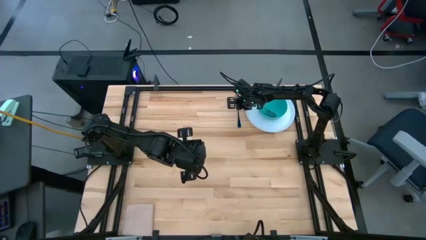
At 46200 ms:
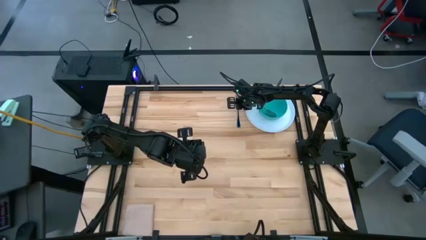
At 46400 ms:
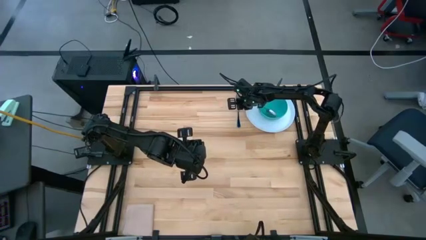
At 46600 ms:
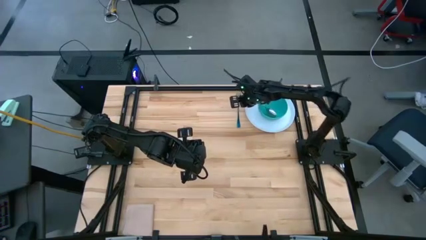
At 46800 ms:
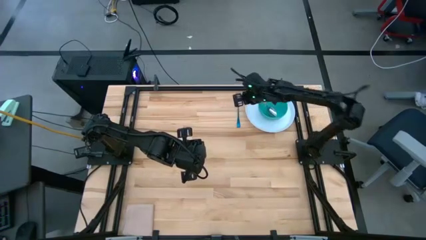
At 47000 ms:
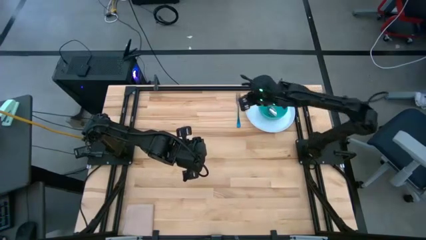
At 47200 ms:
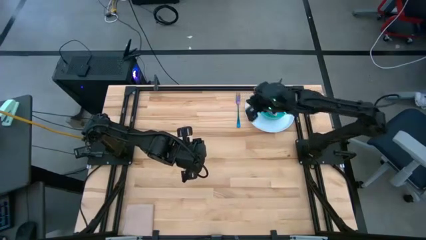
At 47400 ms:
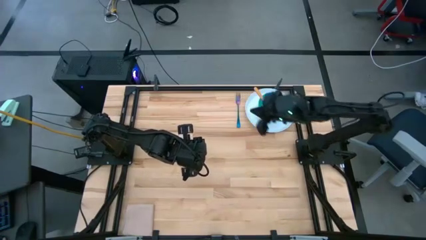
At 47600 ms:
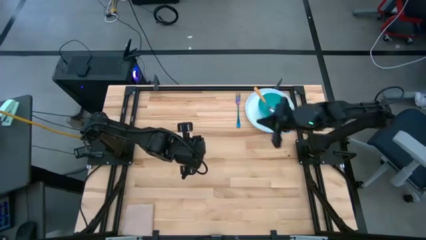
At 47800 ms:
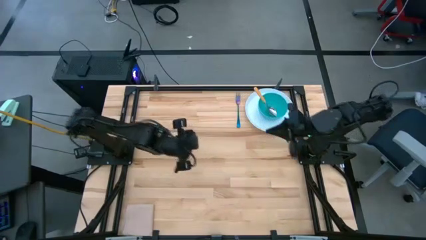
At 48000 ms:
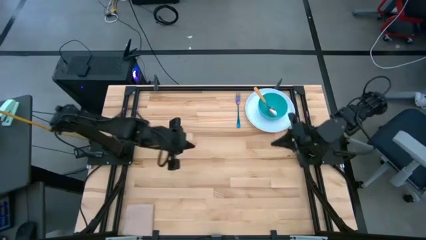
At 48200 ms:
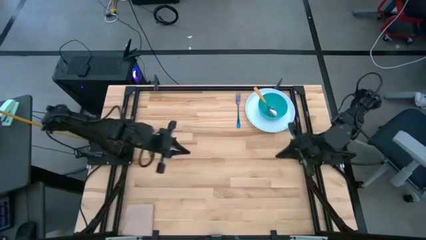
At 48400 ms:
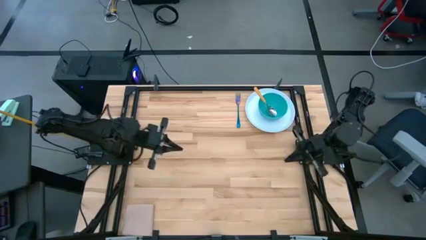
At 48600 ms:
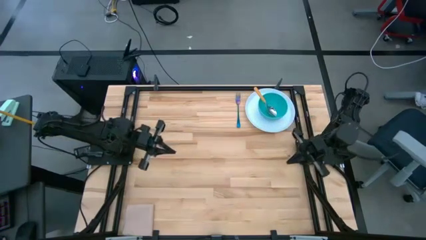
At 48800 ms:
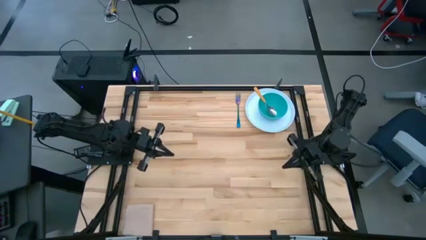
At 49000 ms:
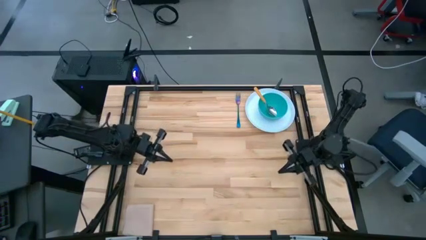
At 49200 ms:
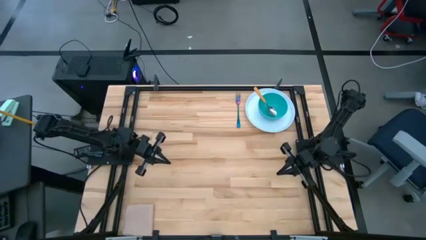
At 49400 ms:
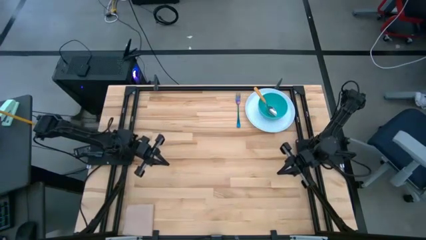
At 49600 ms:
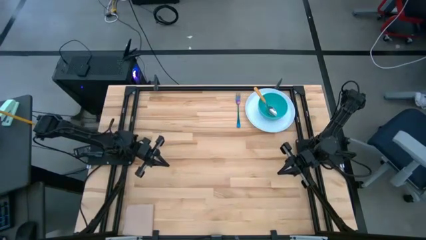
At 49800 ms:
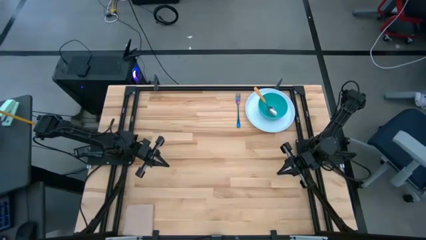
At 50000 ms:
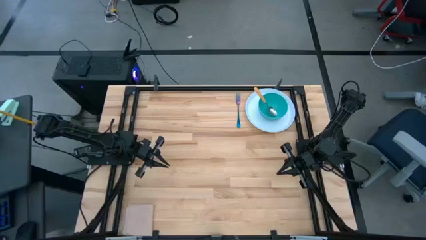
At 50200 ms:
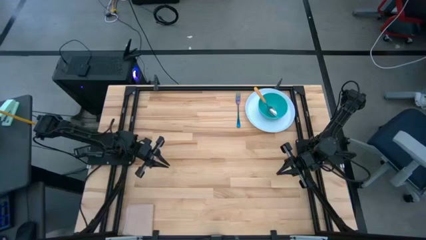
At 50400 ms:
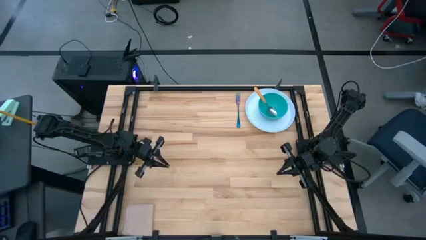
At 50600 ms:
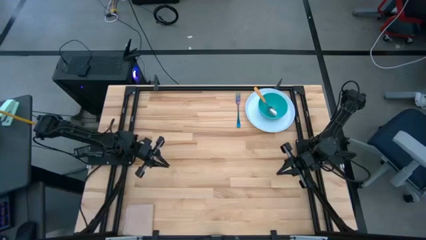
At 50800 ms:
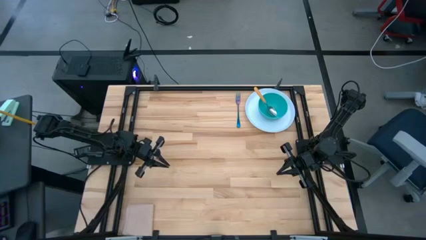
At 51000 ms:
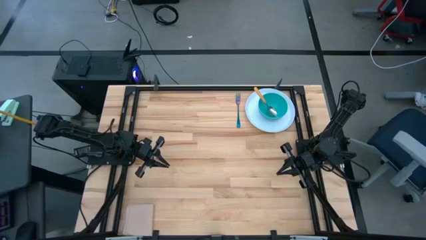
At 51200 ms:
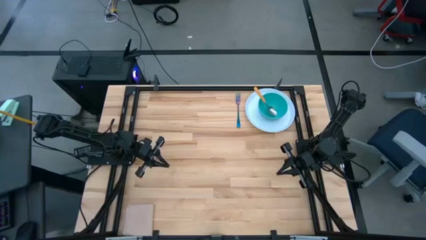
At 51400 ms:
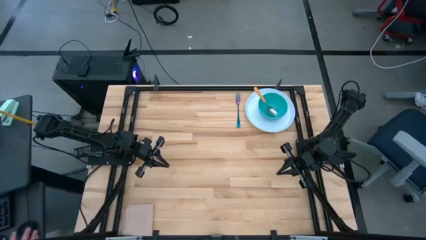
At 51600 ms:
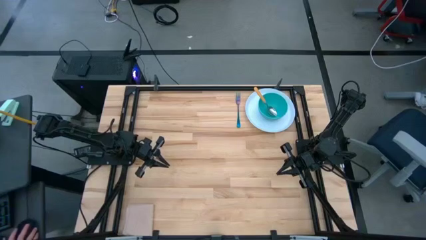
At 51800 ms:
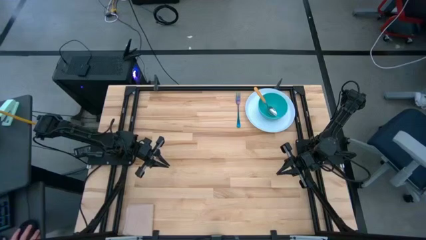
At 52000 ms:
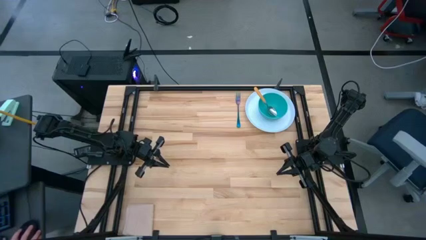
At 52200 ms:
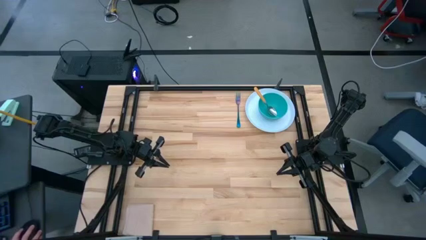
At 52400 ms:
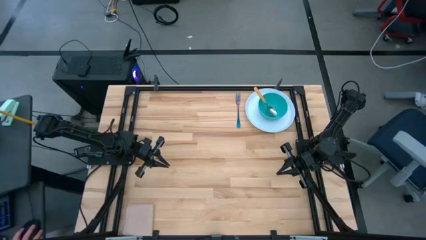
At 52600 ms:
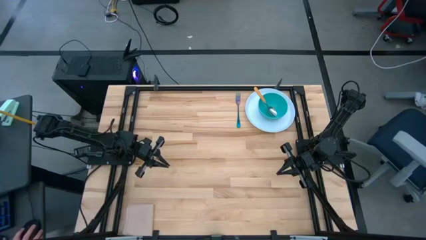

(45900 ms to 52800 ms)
Task: Set table place
Return to Home Position

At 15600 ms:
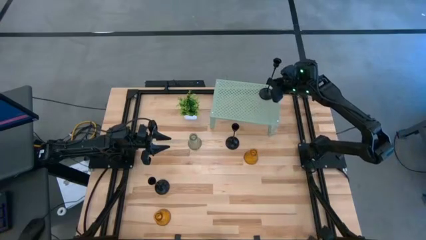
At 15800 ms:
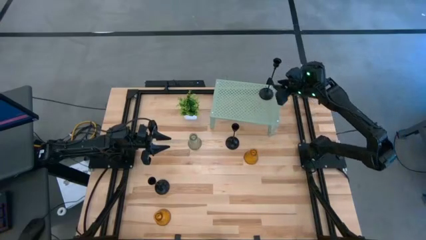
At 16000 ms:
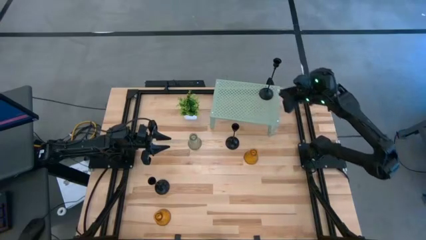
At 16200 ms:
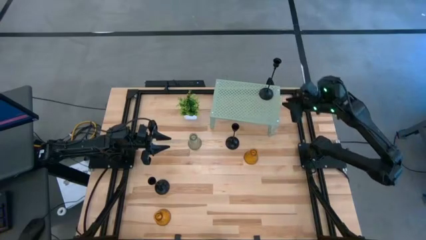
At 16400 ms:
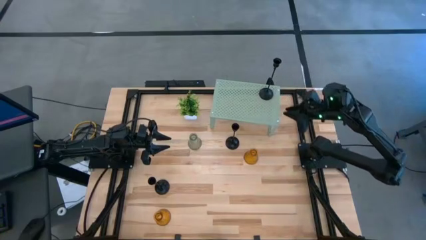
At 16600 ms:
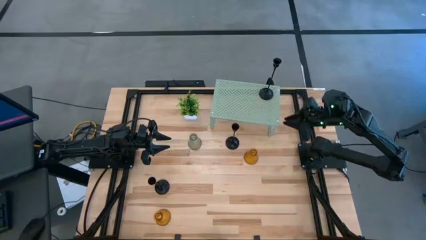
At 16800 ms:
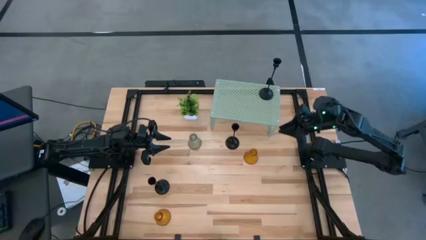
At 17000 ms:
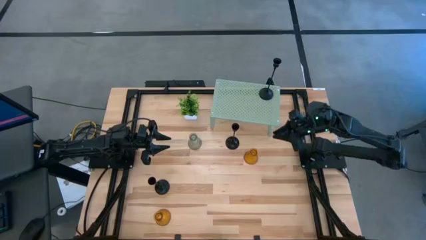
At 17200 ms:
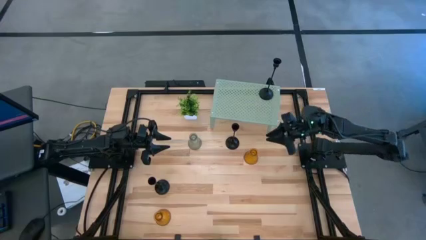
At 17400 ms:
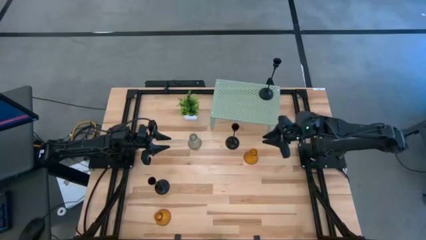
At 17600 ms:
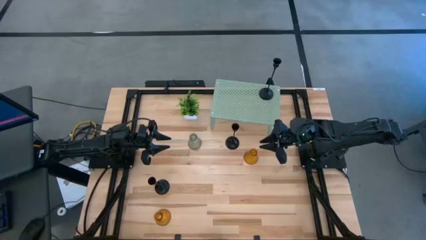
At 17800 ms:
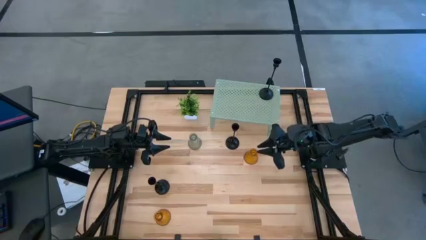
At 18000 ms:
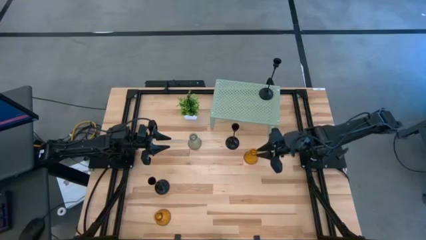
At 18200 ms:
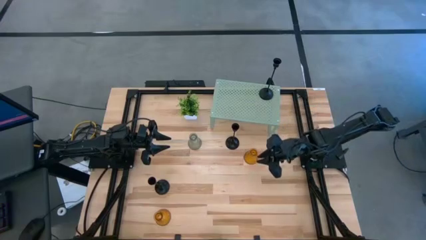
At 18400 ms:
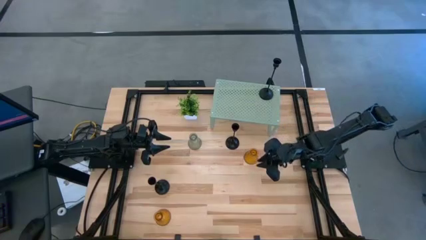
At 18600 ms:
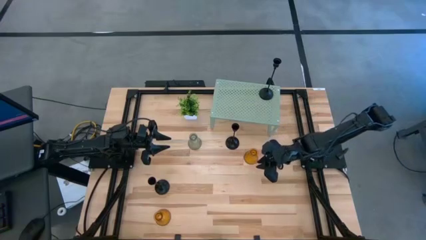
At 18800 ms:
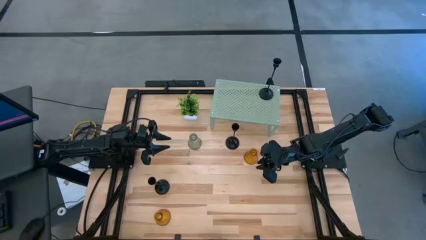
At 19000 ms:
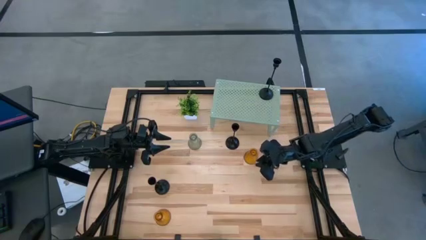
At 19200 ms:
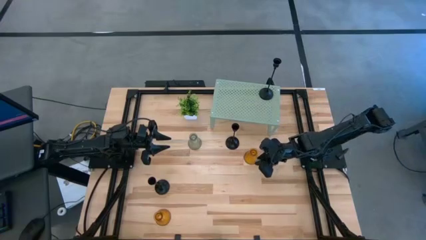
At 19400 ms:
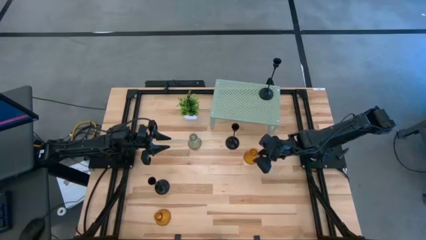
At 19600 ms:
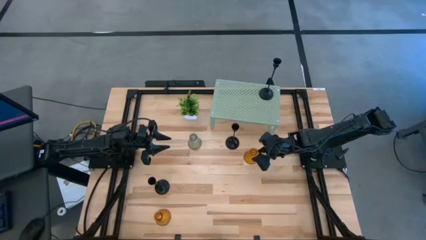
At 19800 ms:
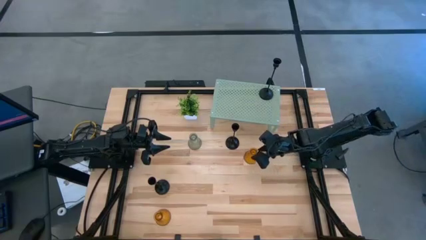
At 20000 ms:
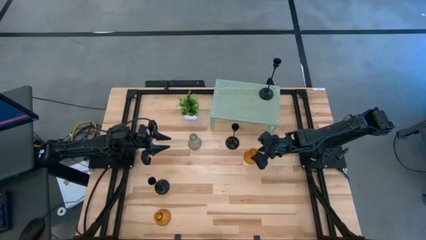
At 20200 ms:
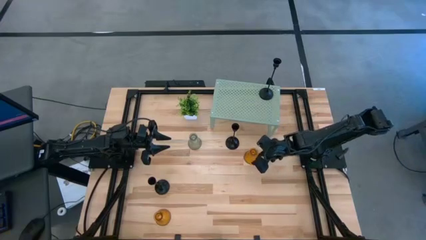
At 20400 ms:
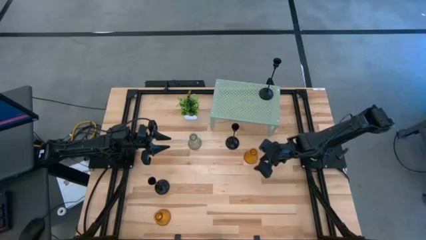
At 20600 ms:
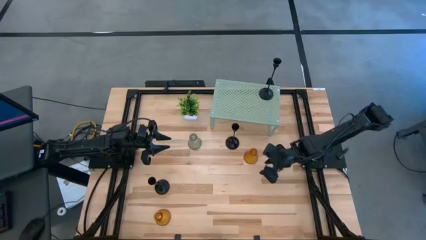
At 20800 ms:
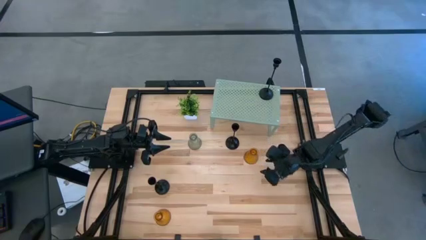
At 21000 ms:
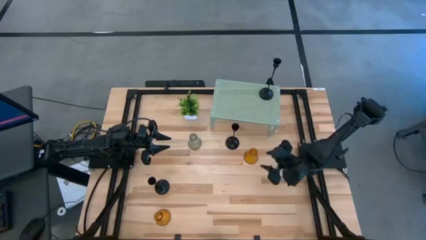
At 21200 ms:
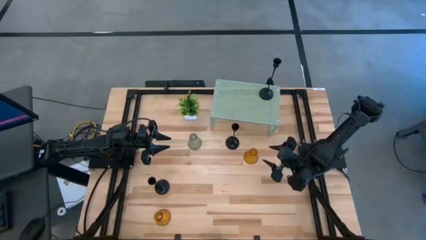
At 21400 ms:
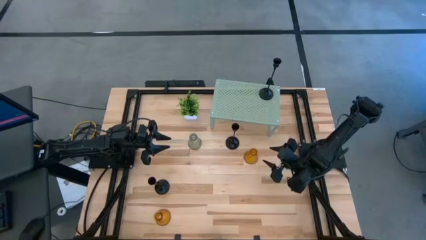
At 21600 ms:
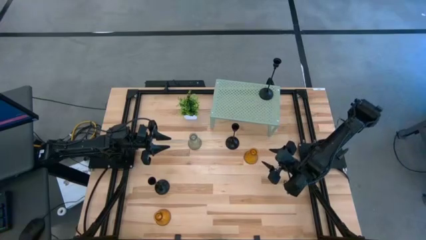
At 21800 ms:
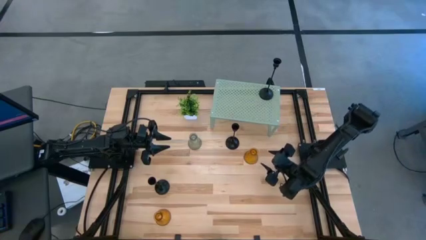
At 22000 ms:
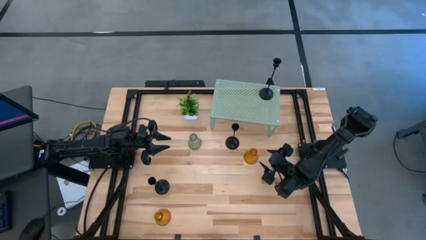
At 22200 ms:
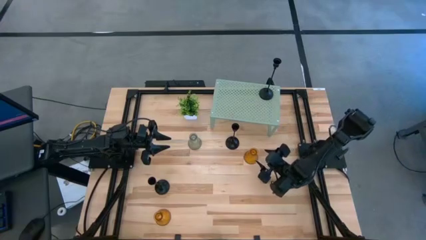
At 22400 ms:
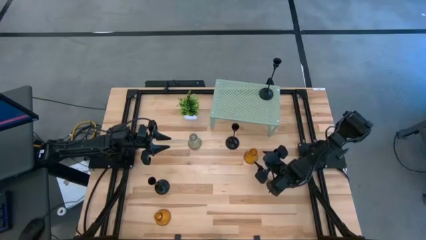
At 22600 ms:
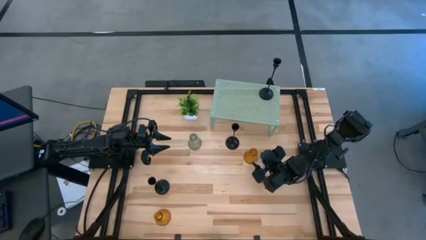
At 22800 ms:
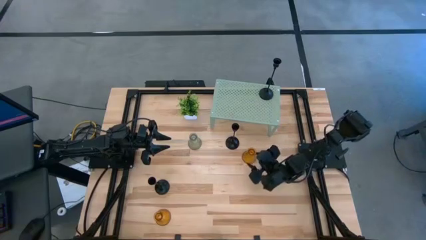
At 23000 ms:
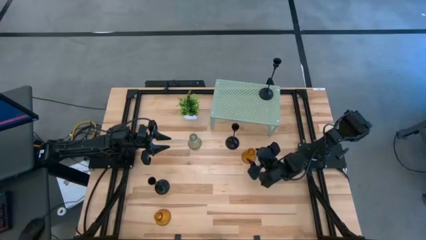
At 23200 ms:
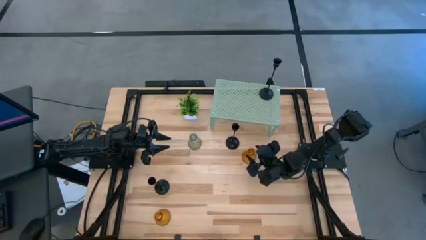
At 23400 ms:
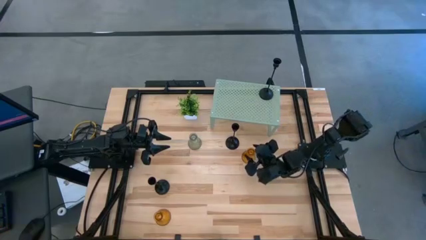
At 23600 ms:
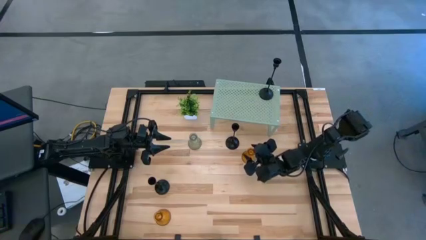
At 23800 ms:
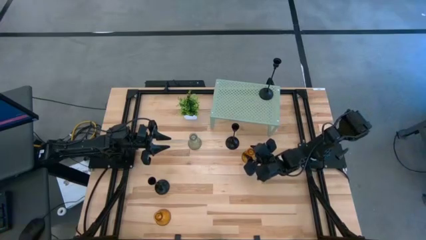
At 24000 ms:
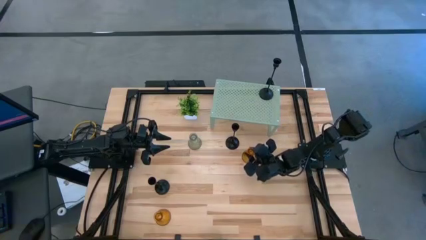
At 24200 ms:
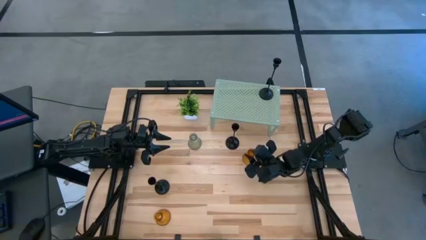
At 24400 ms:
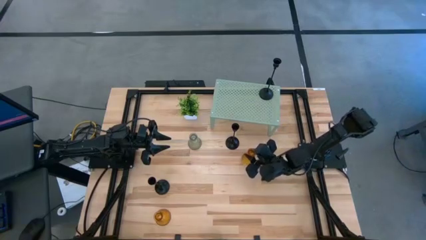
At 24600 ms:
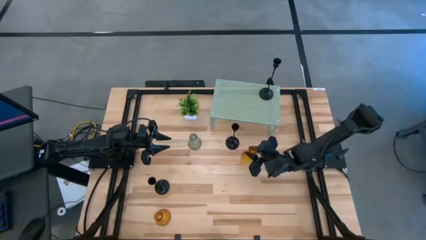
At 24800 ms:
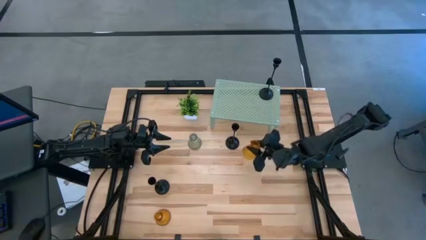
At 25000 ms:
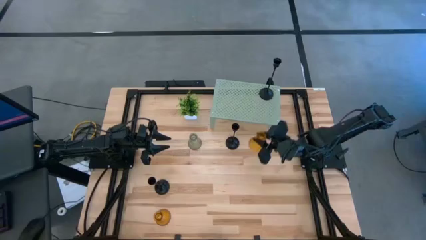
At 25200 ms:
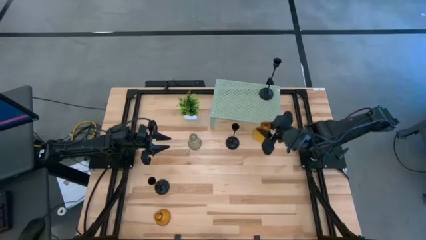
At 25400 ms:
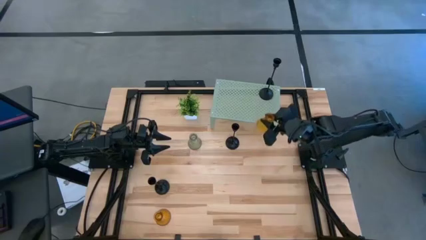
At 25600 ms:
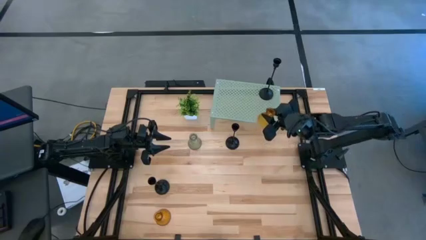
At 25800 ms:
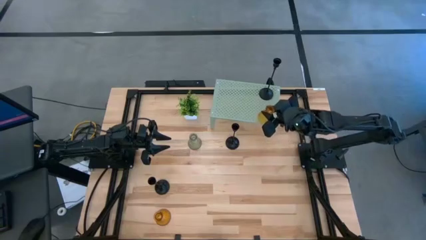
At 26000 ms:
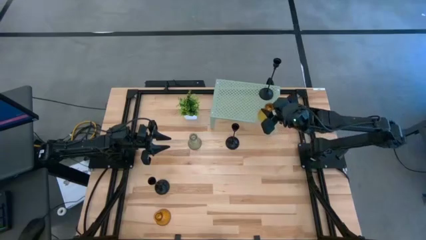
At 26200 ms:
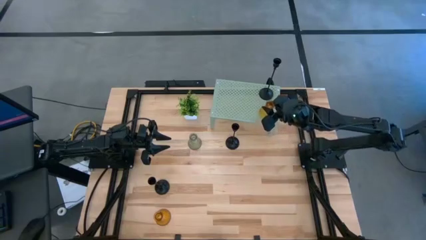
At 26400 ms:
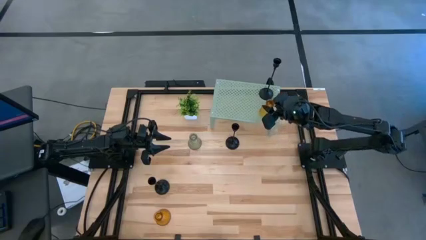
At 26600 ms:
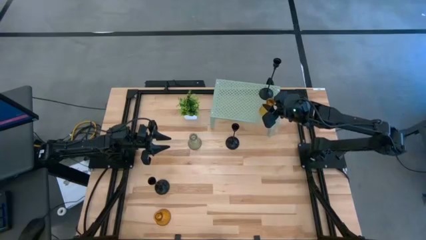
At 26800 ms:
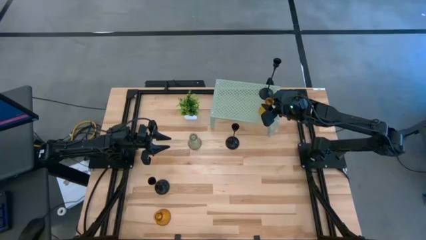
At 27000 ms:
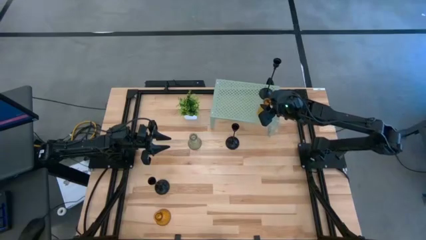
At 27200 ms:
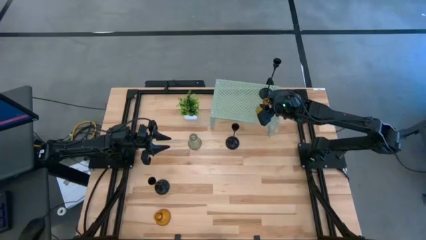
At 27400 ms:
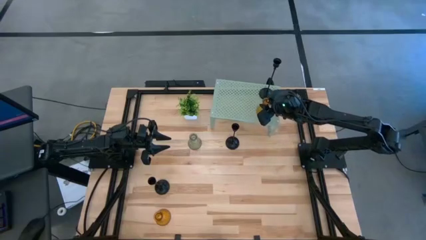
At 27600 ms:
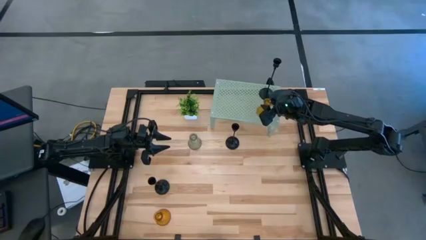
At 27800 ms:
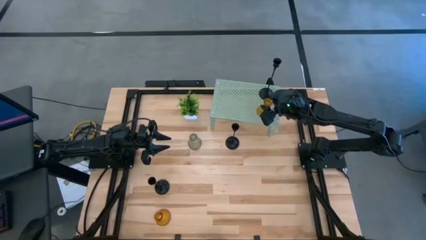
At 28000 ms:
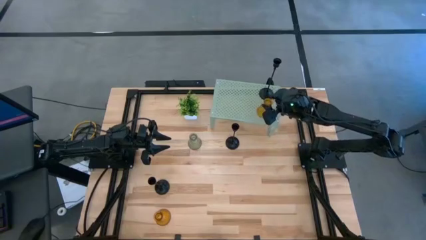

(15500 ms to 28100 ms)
Task: Pick & Place candle stick holders
Put the right gold glass candle holder on the shelf
